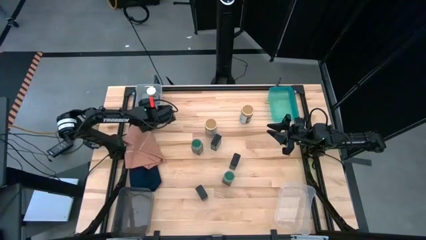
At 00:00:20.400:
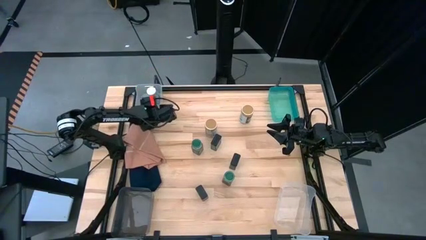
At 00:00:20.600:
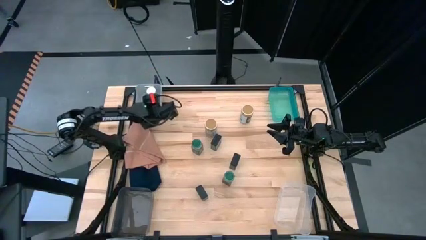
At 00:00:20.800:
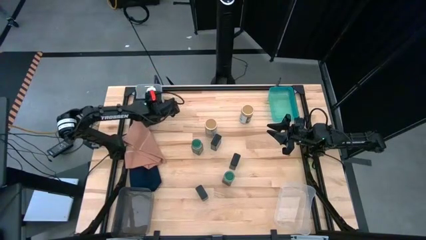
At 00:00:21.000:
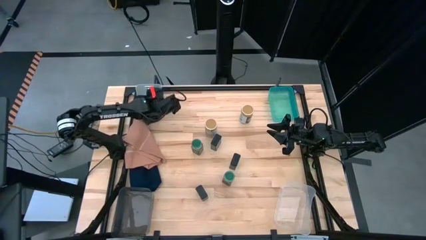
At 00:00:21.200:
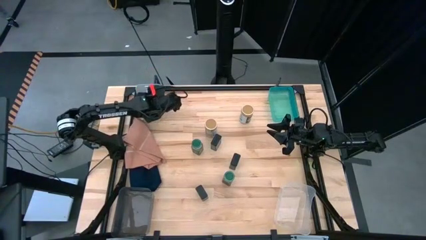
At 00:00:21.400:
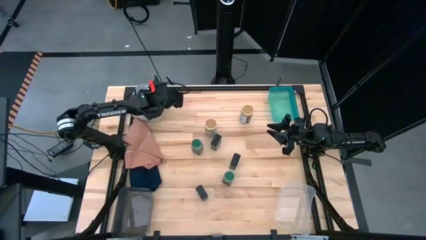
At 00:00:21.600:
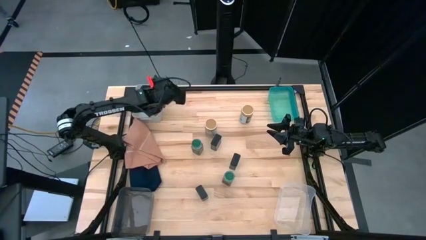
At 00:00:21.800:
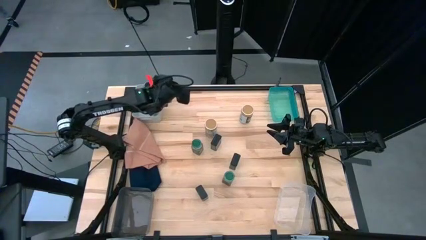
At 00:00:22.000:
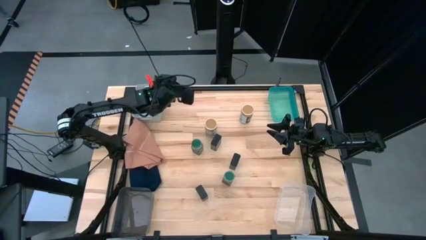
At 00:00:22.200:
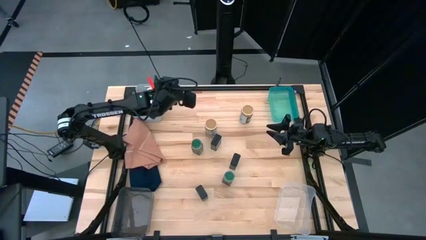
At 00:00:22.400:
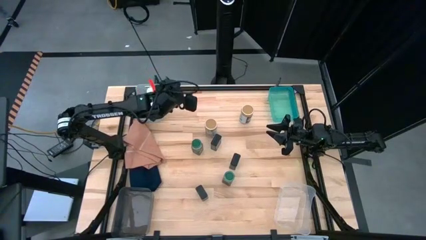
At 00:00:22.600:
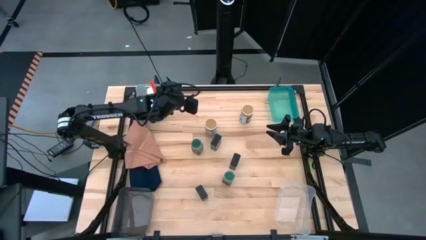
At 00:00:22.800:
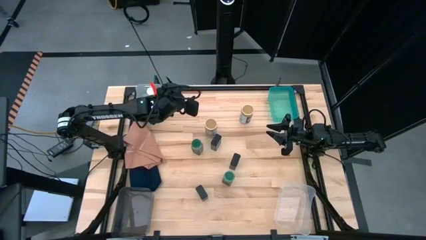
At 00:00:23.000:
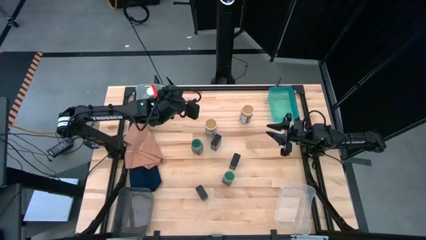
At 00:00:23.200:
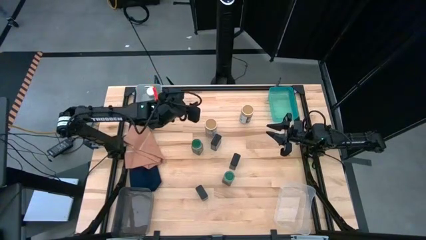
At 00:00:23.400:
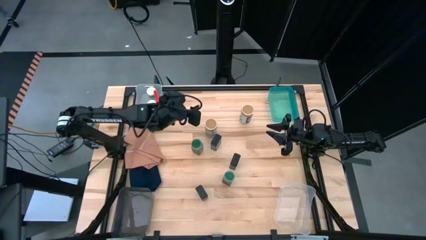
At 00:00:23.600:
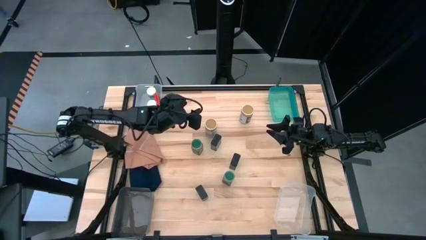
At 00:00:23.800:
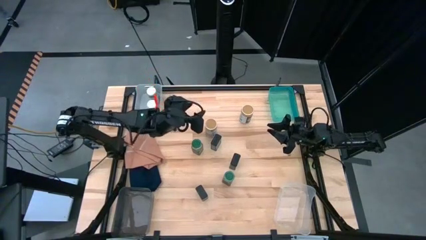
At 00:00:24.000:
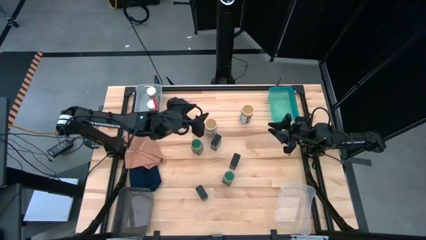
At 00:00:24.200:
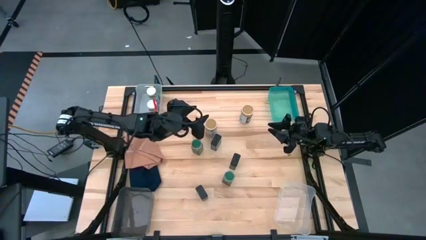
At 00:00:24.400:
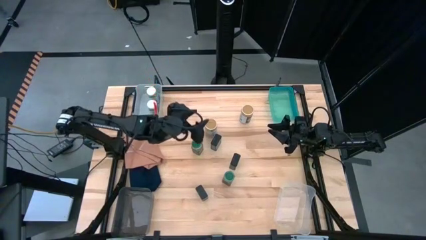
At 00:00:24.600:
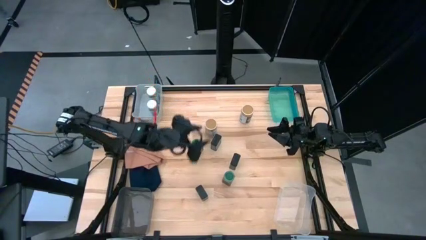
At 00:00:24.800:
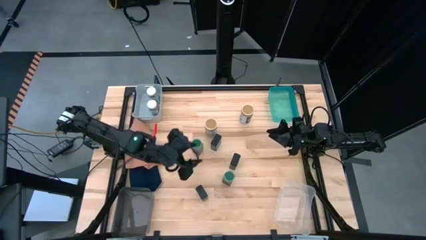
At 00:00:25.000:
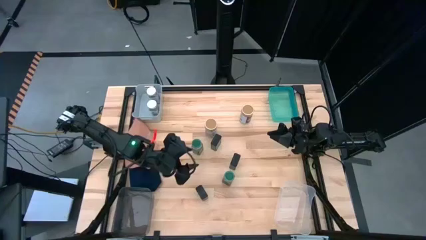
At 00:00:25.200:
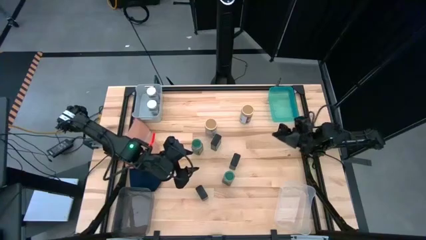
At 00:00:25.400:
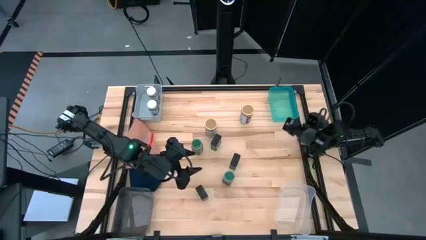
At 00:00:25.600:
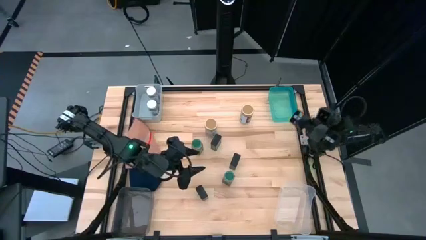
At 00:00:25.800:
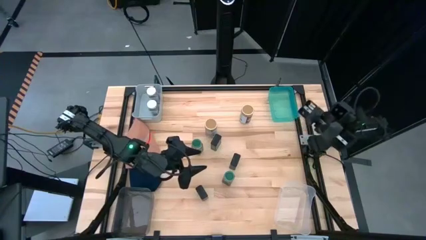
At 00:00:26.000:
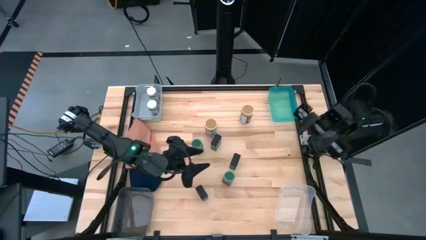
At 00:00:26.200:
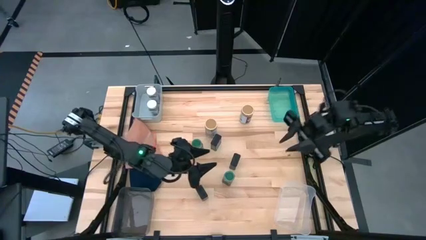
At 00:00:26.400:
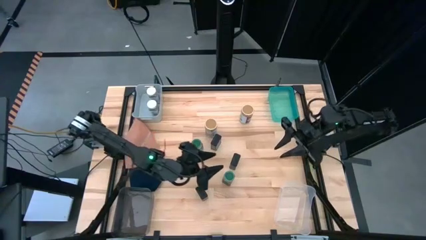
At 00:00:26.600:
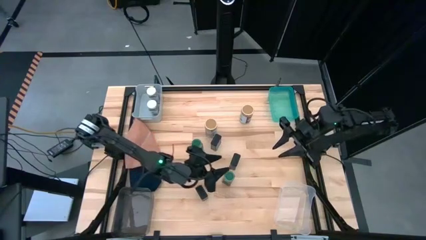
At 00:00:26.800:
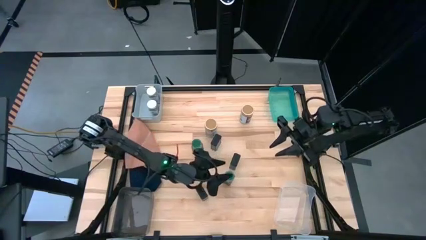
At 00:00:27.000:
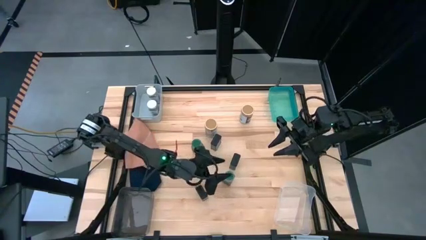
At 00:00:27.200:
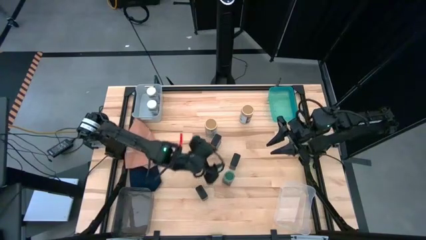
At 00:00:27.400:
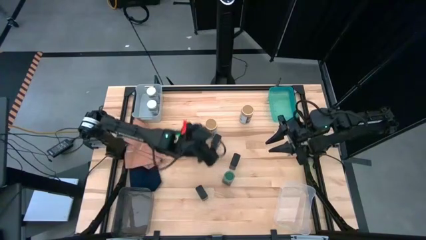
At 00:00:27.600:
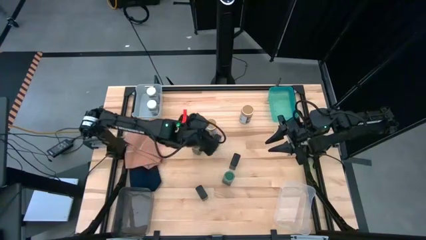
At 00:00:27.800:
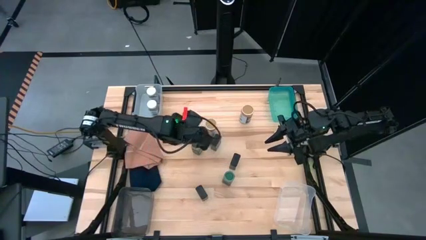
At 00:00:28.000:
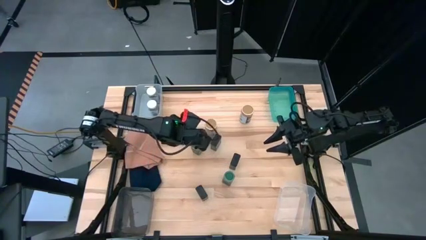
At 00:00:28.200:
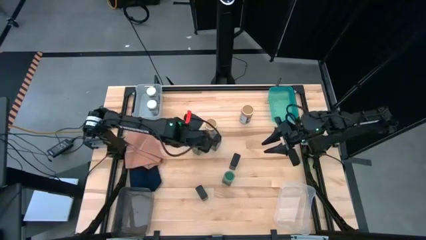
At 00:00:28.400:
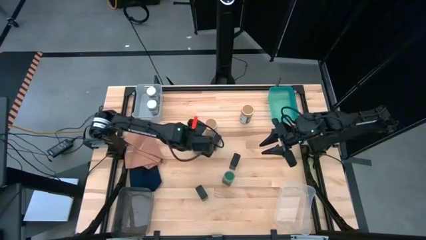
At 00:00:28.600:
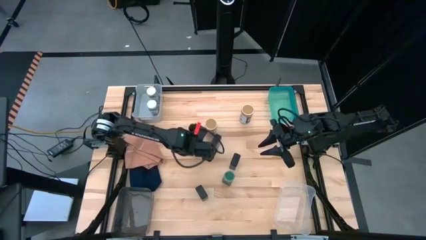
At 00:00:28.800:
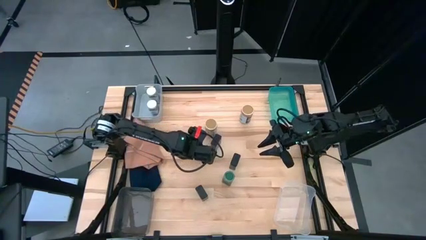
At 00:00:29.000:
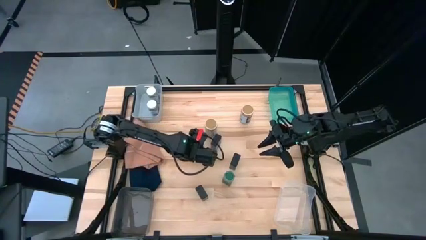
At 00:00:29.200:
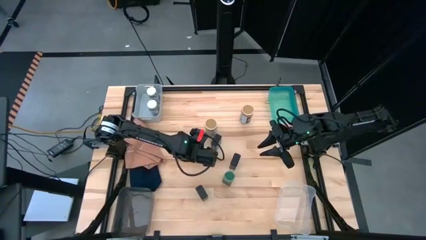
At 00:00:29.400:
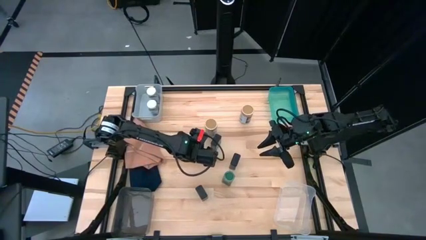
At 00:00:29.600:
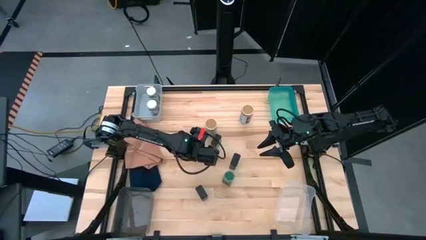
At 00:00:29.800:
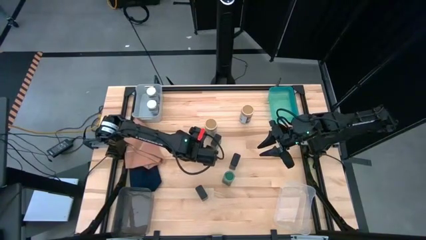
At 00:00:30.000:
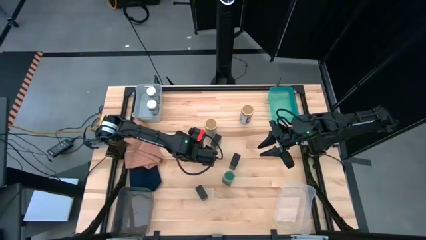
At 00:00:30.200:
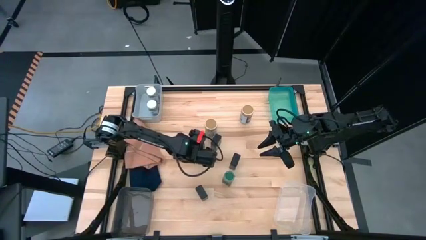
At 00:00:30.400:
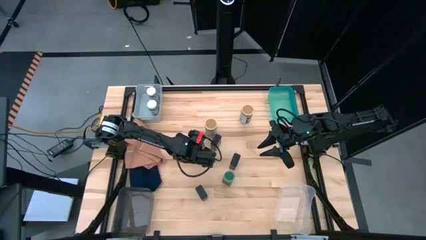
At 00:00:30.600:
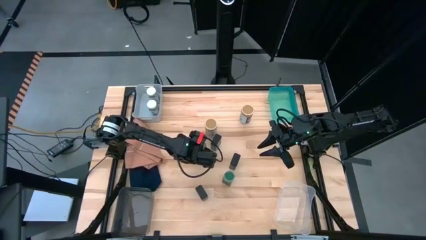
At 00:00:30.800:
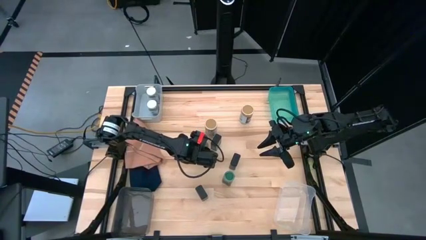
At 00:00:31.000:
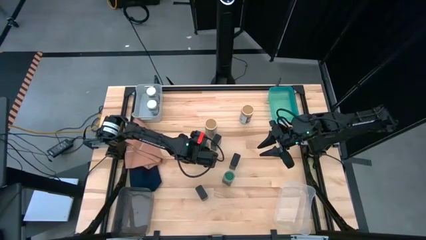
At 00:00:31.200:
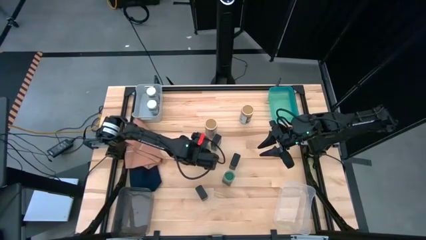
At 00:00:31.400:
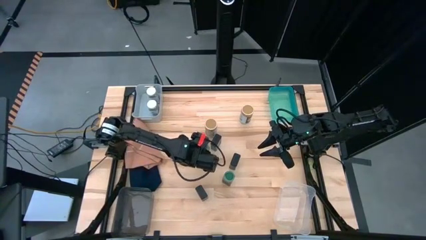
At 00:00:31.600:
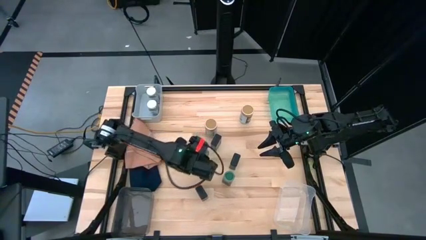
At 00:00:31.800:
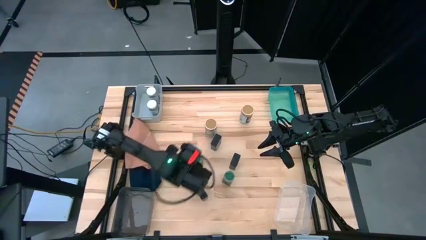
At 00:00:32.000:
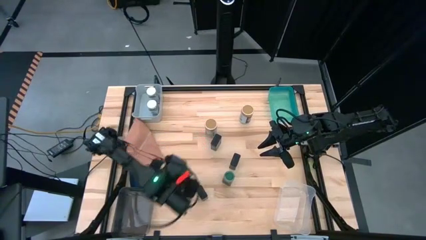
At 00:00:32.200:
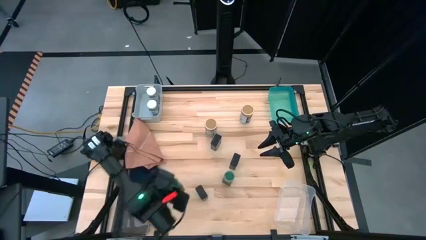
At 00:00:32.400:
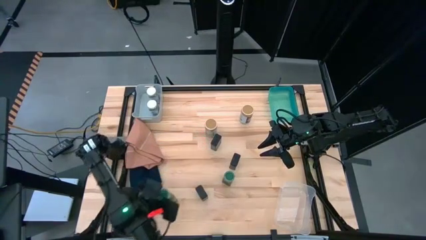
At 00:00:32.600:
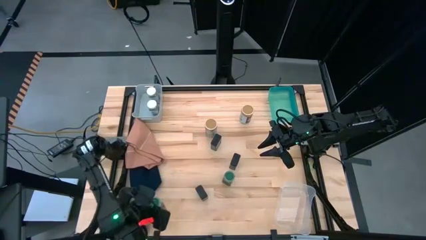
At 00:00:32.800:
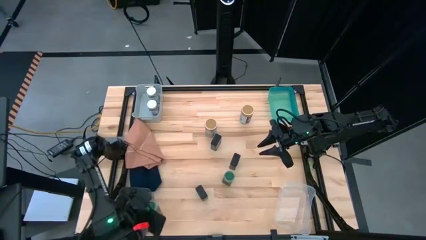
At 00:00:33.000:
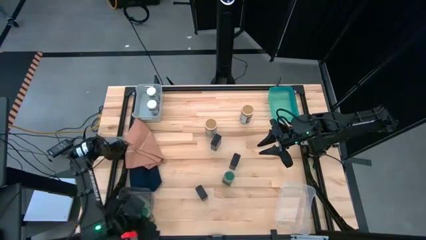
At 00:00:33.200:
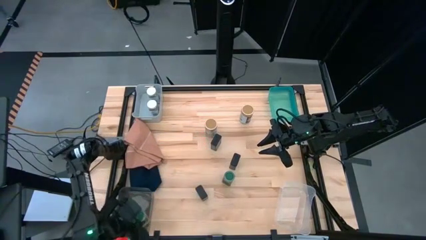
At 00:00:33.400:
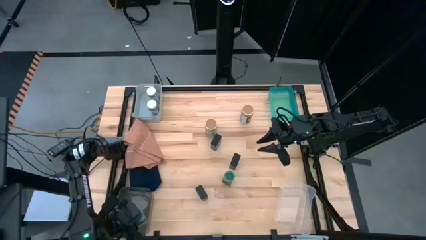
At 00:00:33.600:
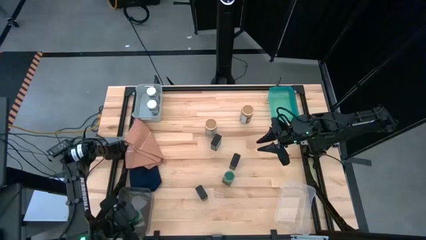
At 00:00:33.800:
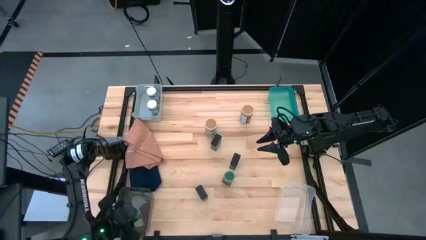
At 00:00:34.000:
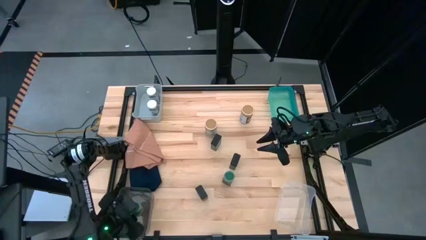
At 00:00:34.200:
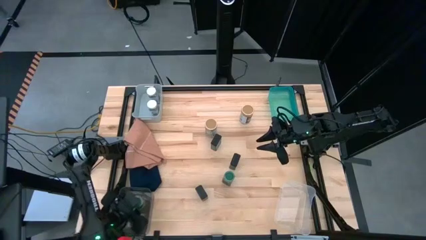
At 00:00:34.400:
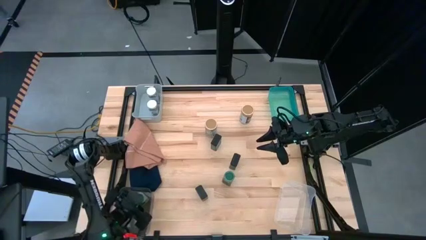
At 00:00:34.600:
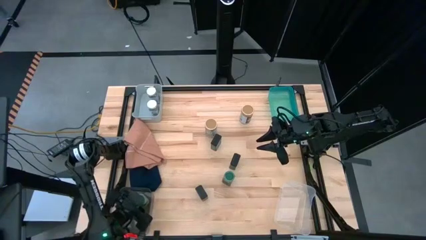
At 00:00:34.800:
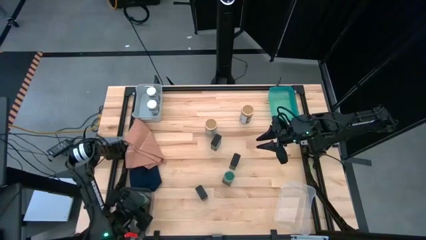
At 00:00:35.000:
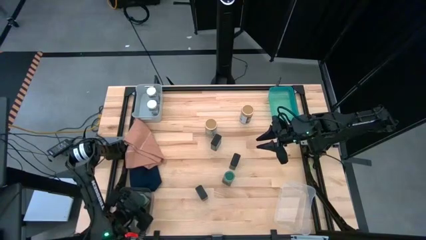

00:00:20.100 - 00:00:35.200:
Task: Sort spices by type
Put the top green spice bottle into the black transparent bin
